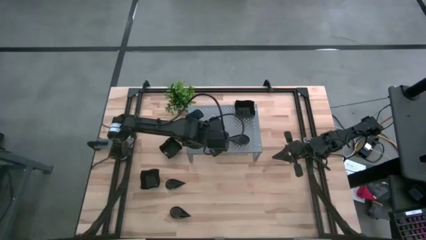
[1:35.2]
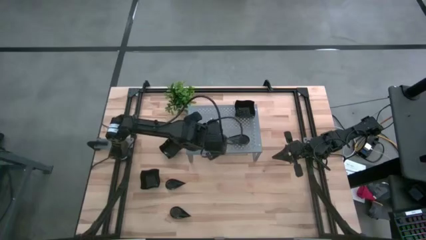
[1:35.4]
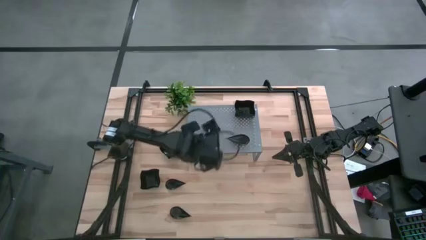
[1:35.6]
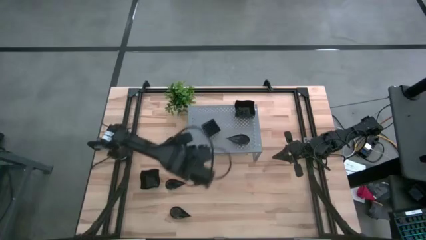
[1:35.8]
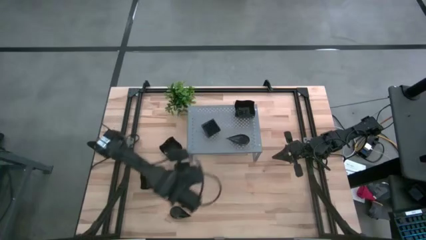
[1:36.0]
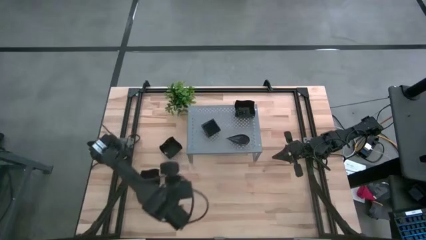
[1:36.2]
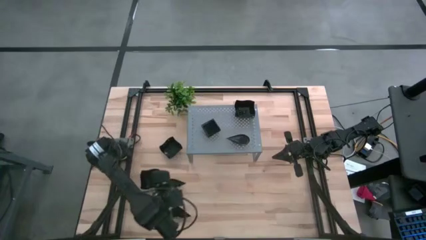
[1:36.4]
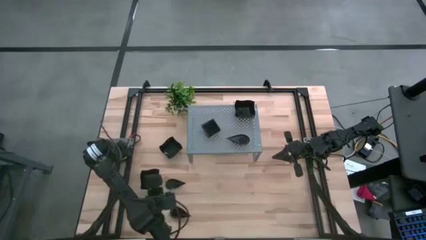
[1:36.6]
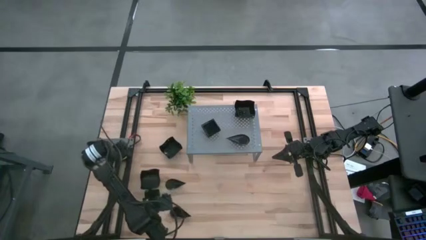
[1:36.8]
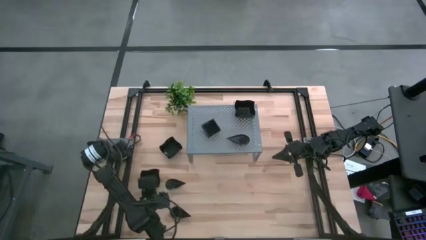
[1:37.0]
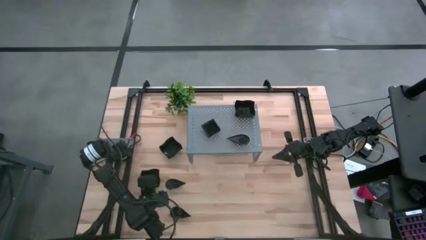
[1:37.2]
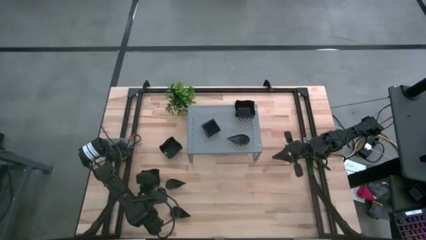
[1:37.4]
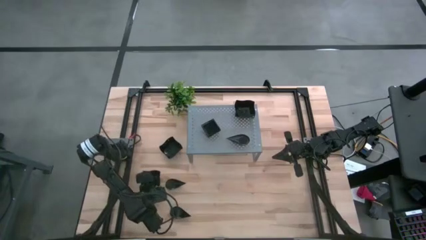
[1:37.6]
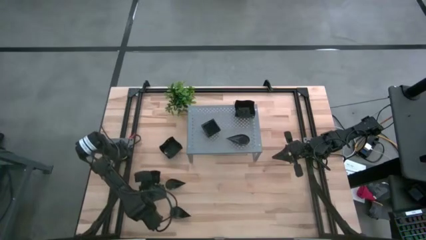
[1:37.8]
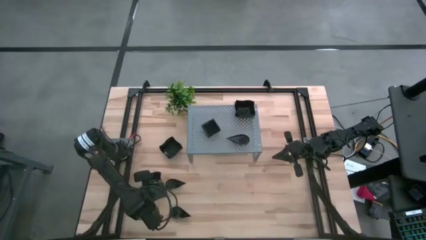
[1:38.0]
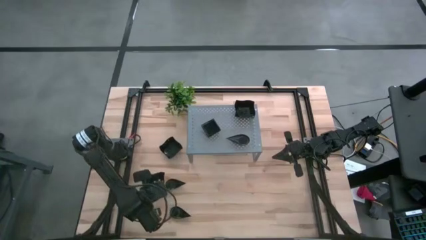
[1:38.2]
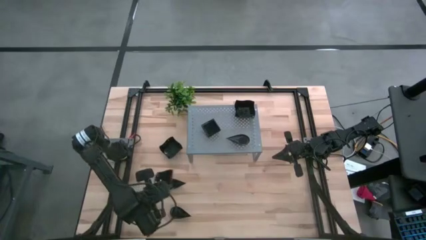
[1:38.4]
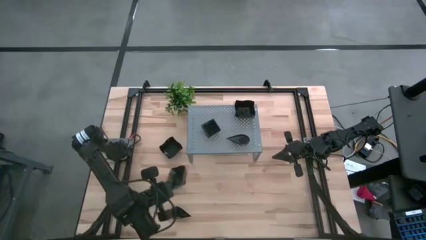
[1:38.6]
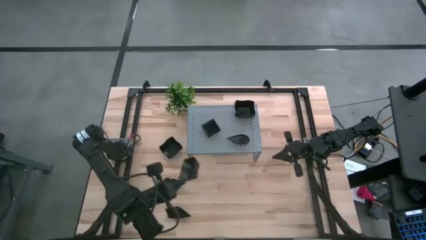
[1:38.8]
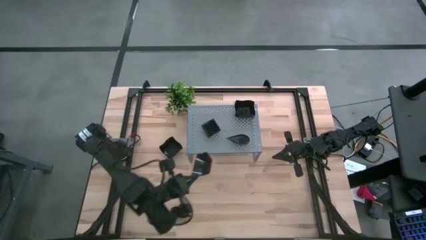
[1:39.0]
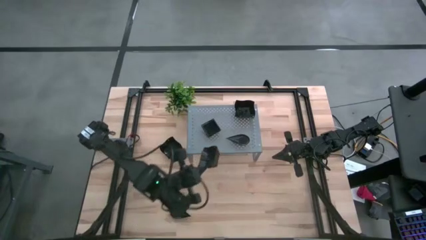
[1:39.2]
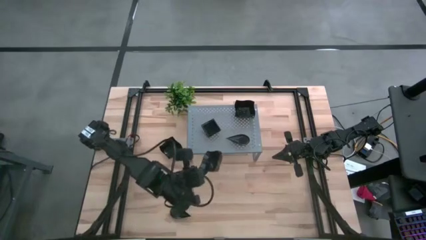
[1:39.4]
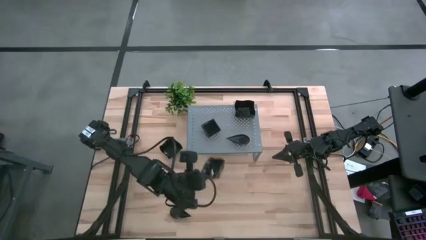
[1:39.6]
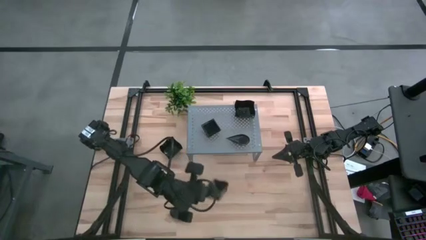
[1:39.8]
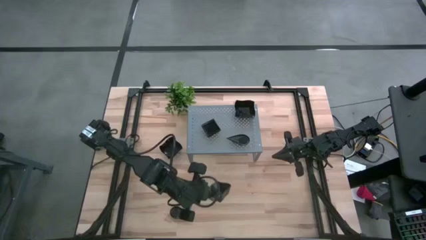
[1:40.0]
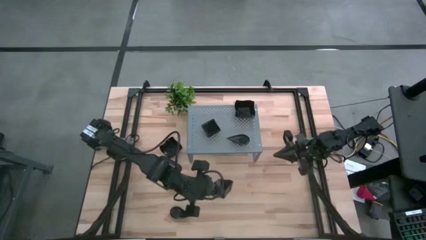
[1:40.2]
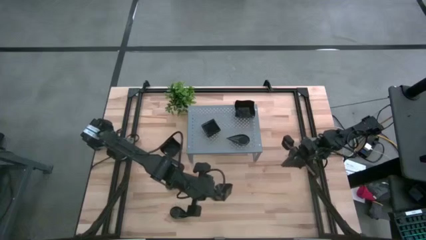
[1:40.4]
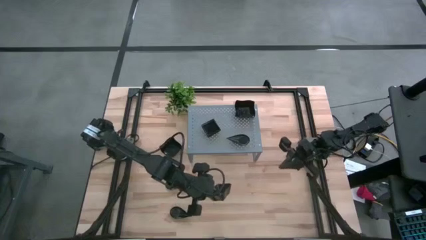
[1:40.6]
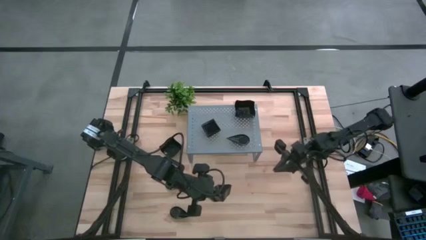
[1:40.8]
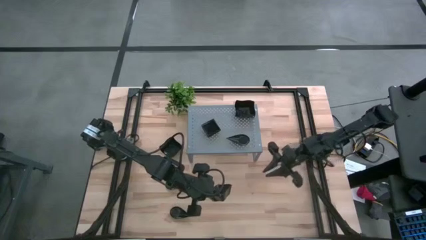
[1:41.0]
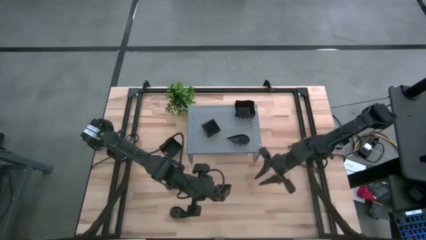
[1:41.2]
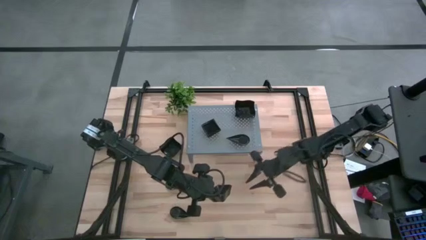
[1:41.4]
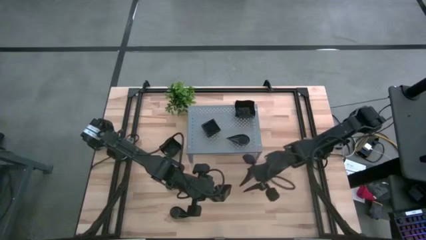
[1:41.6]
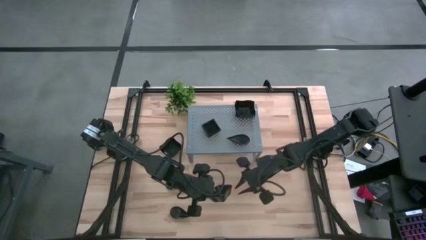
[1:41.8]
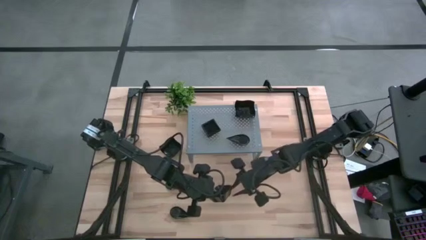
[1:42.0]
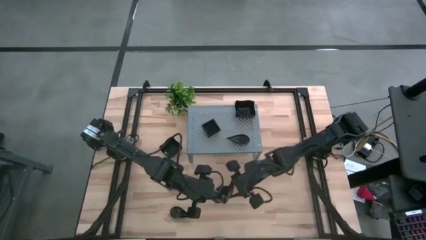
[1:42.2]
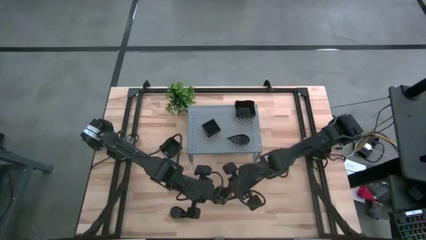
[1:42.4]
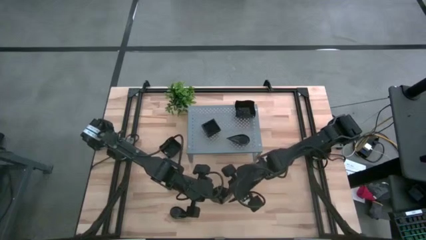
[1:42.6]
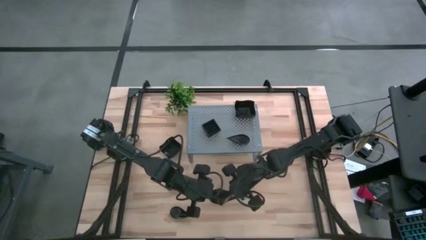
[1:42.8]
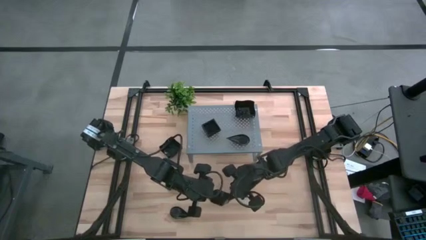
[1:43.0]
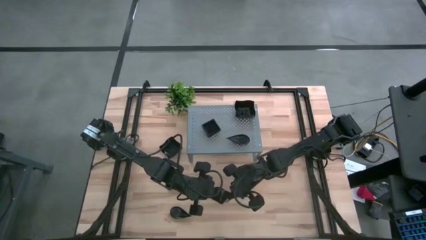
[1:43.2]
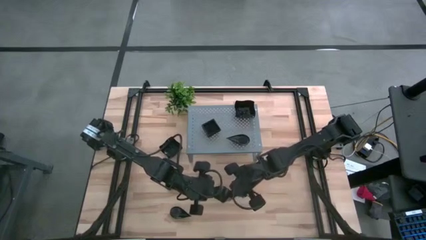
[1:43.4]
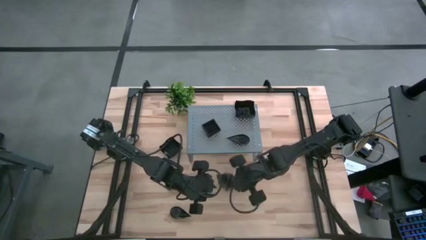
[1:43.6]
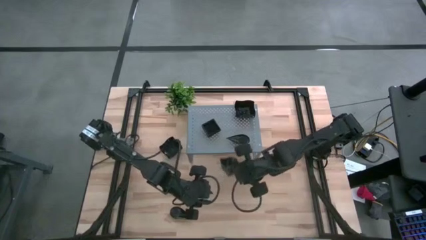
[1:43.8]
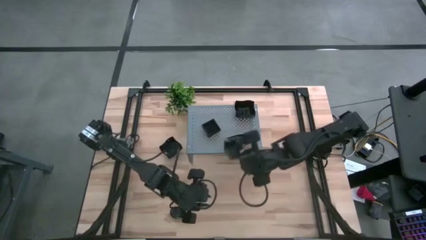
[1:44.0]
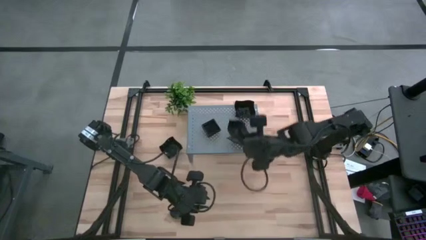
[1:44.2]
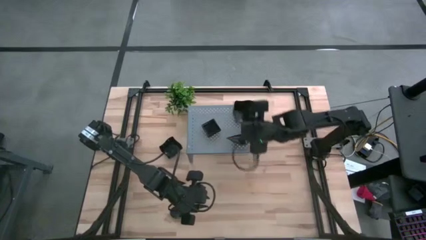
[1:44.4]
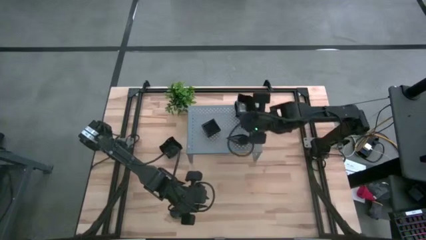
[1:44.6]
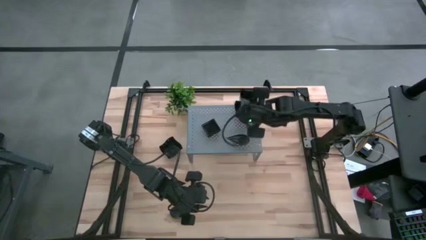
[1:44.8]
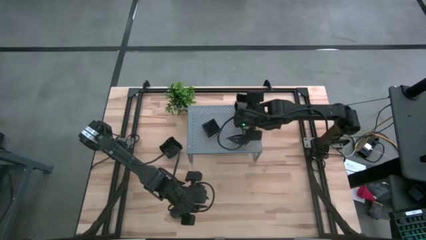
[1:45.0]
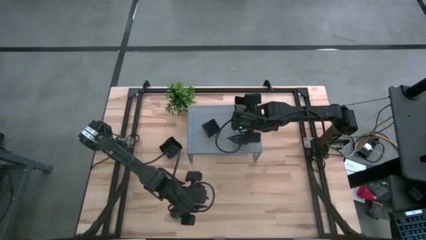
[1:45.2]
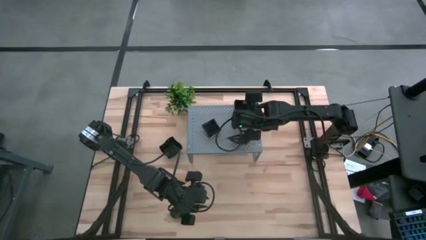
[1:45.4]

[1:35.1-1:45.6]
Task: Pick & Place Mini shaped plates
Stack the black distorted square plate on top of the black distorted square plate on the shelf

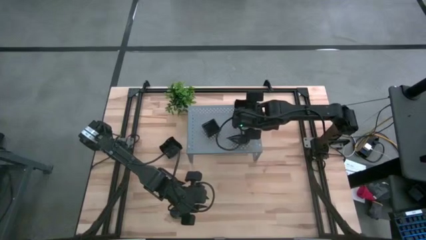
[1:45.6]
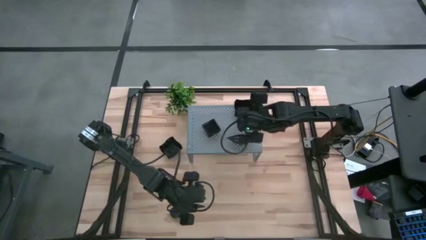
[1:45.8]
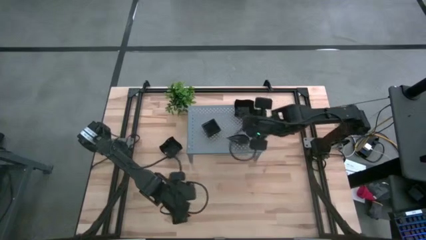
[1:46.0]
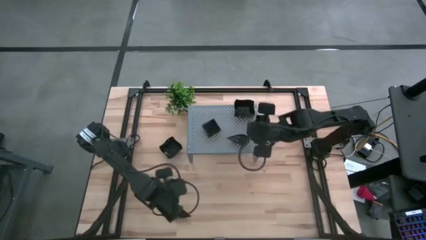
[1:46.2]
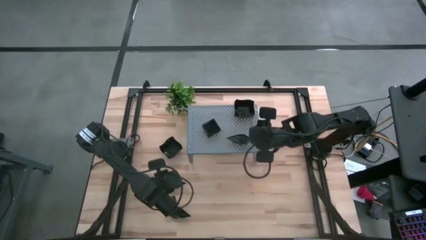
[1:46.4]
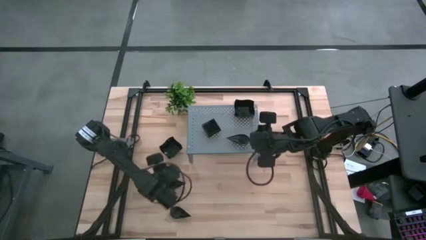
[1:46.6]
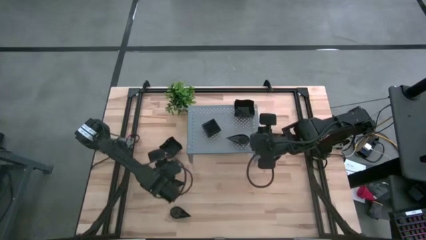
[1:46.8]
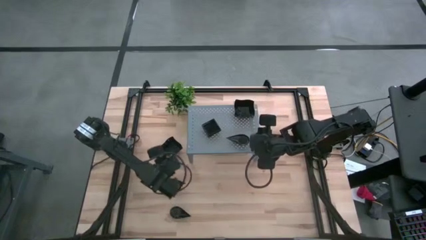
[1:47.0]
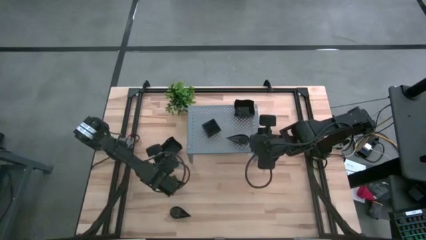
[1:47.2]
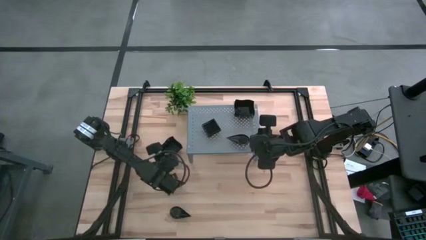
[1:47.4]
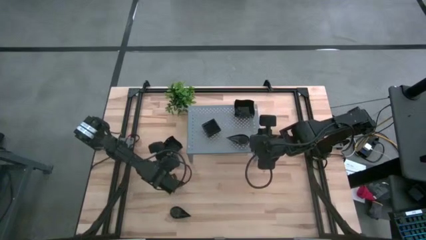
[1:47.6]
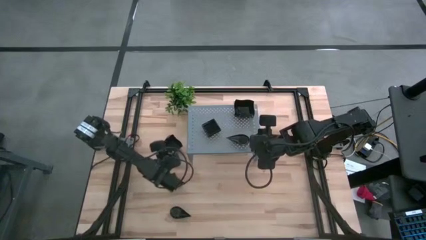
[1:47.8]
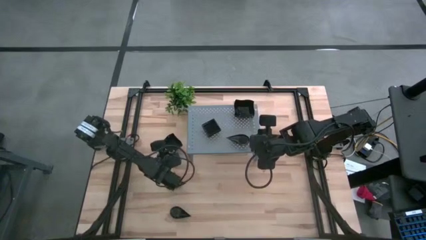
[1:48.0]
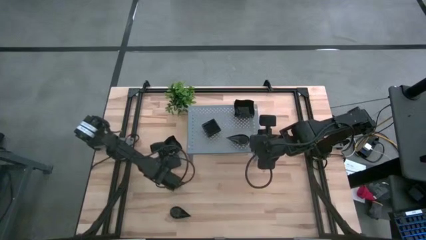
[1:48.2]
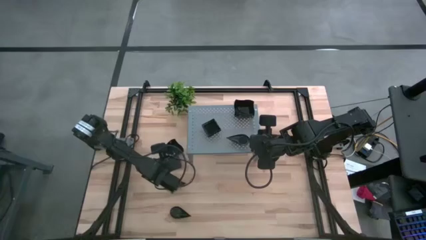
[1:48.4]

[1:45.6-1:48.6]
Stack the black distorted square plate on top of the black distorted square plate on the shelf

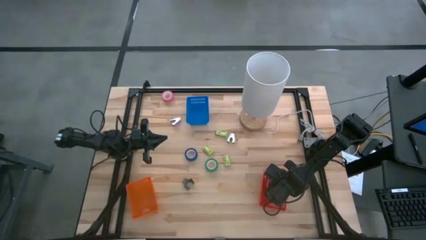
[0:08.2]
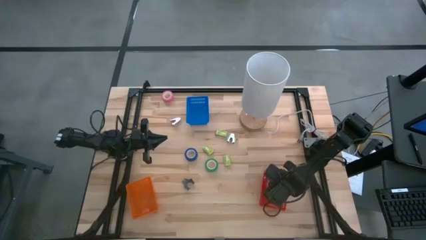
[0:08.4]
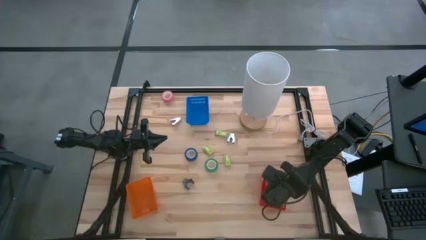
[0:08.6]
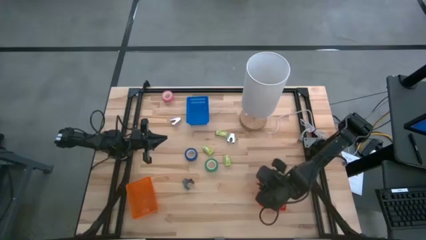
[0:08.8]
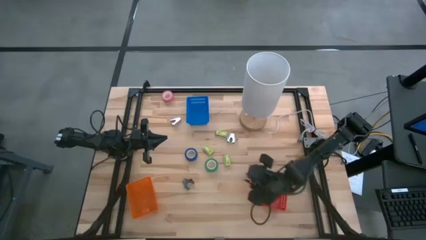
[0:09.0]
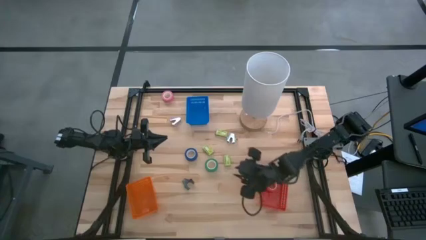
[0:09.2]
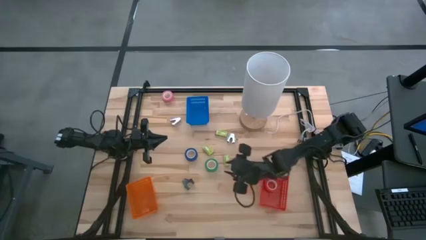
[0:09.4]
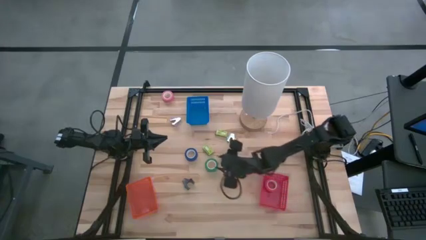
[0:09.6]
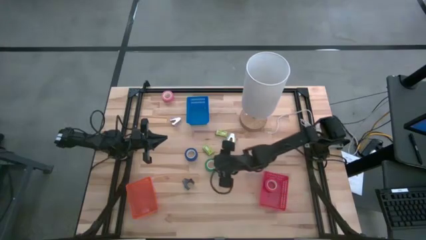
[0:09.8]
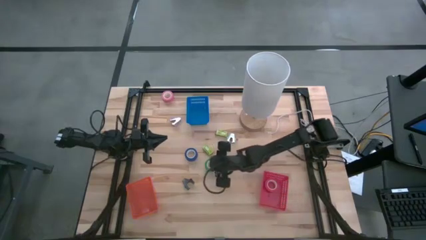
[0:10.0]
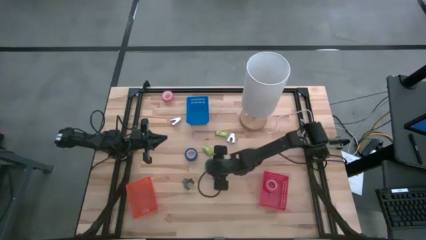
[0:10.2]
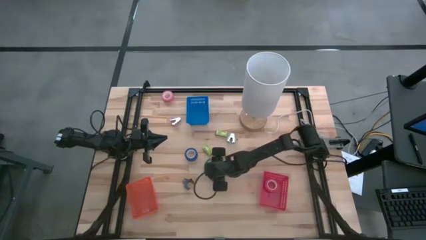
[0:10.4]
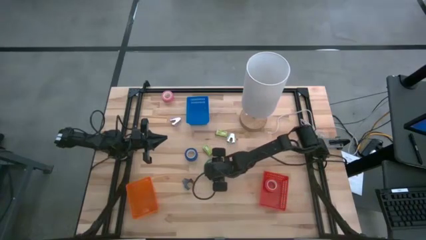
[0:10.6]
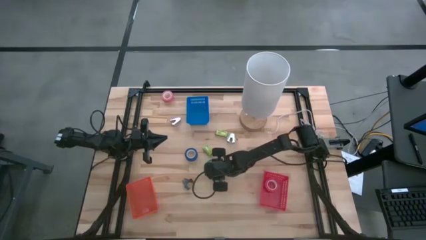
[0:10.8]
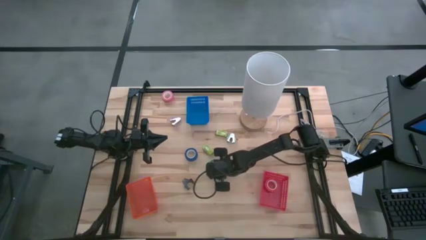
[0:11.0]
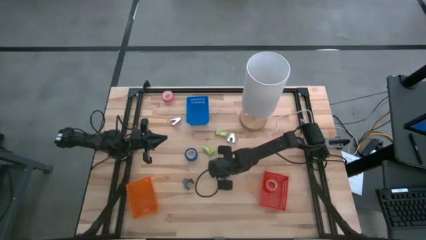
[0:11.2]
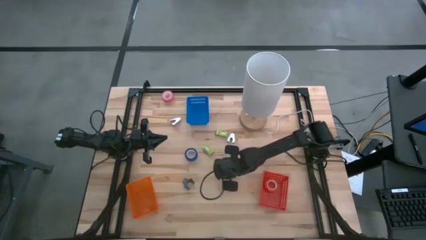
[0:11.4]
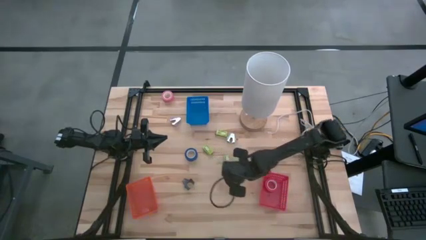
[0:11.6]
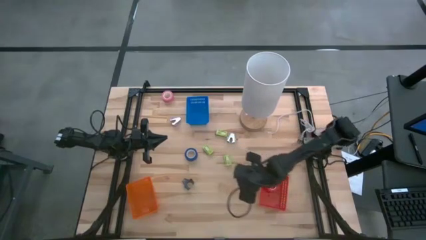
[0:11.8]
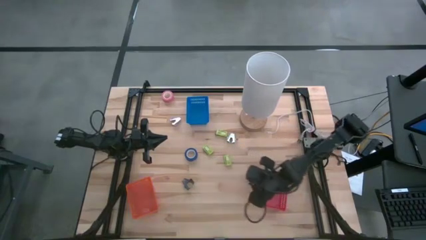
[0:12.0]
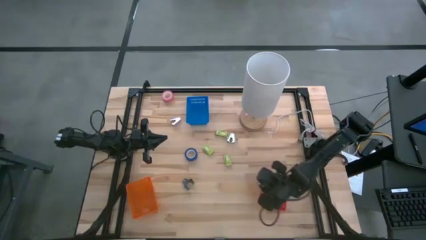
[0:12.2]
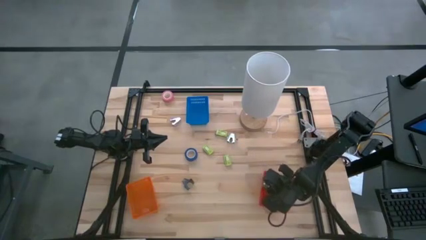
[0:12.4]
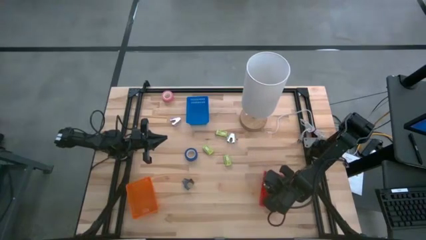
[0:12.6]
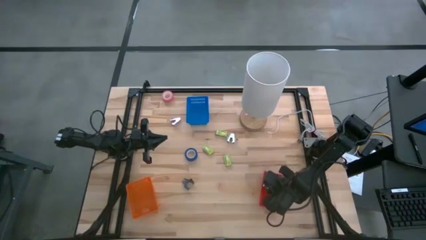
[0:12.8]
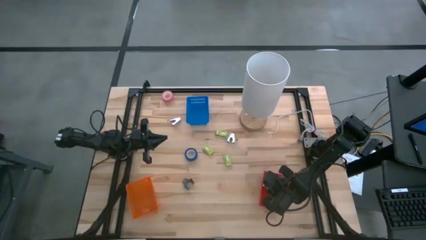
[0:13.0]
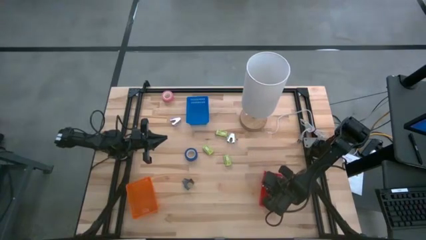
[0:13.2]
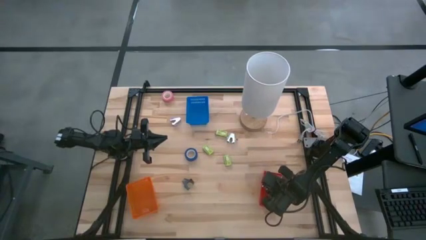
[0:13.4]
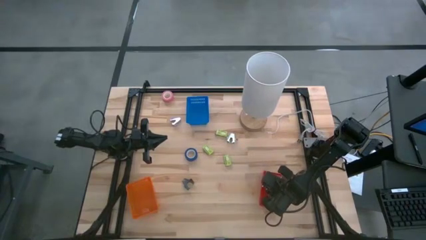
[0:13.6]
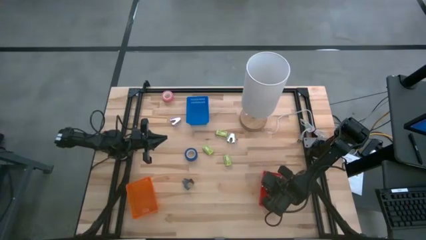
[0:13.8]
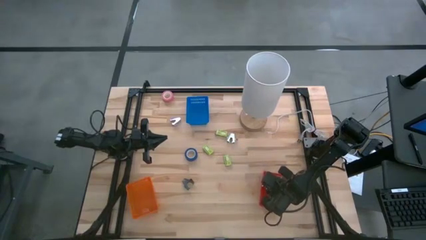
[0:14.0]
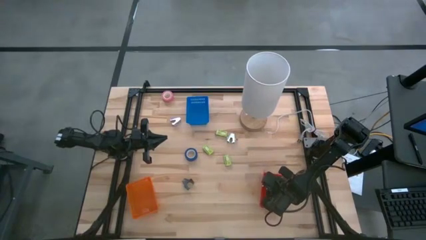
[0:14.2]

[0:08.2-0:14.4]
Task: Pick and place Stapler, Stapler remover, tape
Put the green tape into the red bin
